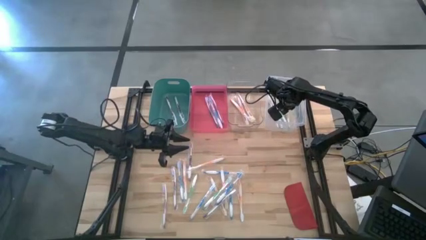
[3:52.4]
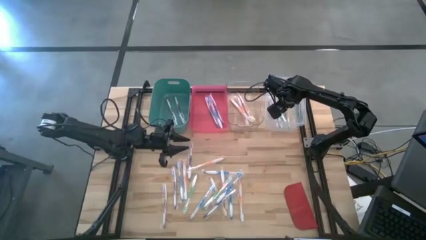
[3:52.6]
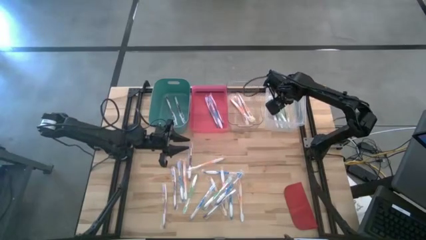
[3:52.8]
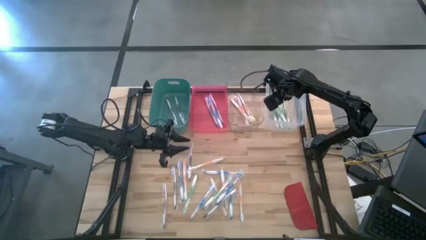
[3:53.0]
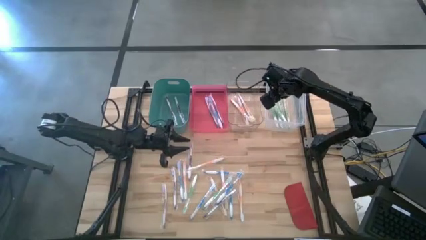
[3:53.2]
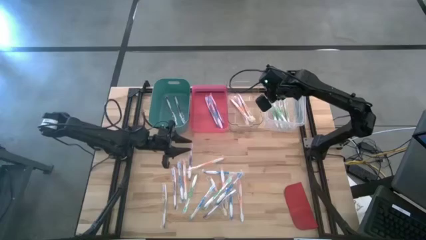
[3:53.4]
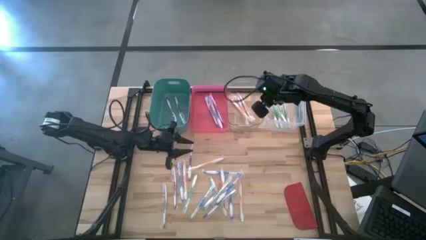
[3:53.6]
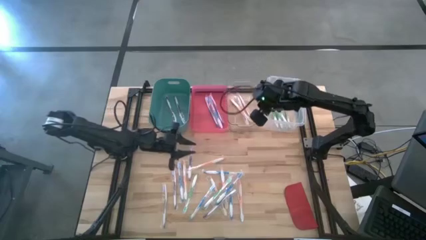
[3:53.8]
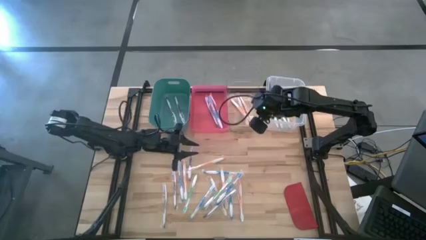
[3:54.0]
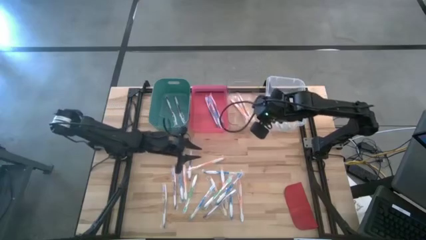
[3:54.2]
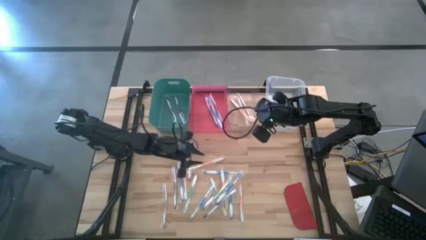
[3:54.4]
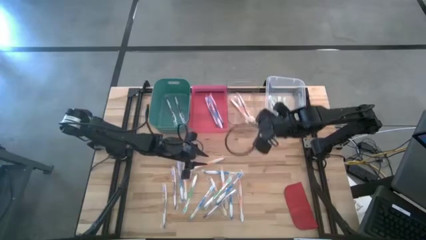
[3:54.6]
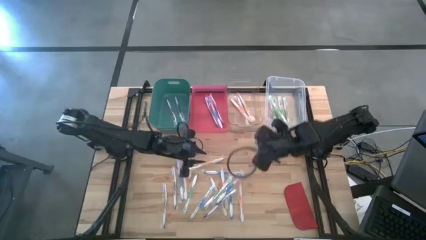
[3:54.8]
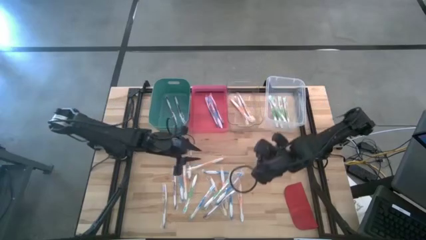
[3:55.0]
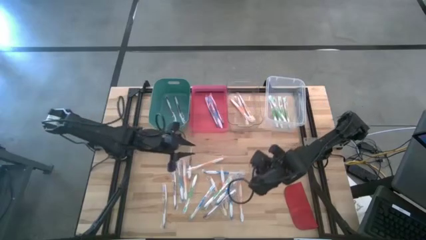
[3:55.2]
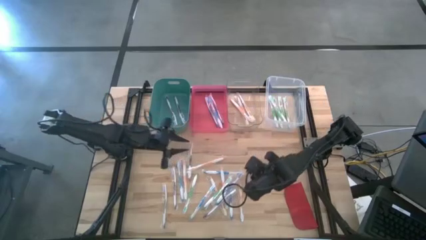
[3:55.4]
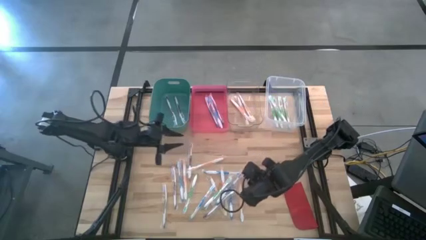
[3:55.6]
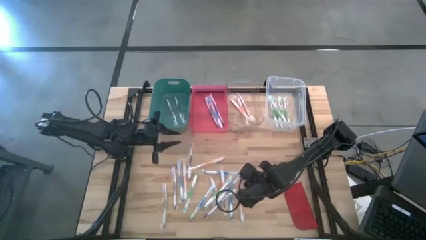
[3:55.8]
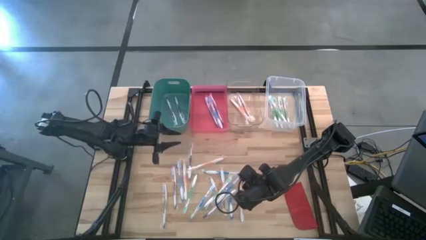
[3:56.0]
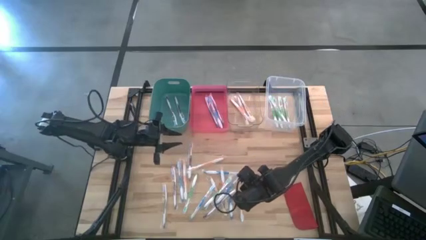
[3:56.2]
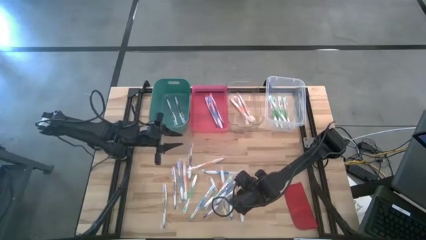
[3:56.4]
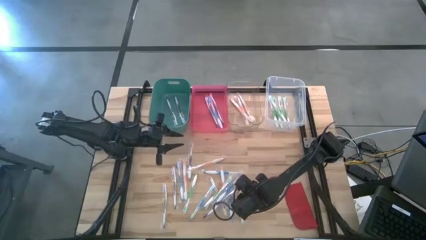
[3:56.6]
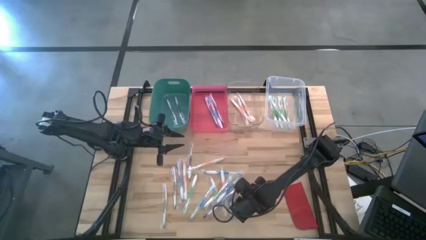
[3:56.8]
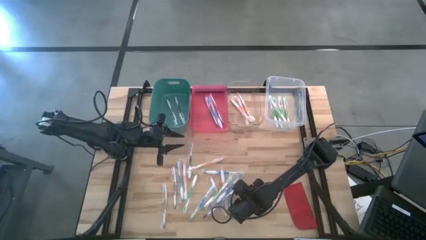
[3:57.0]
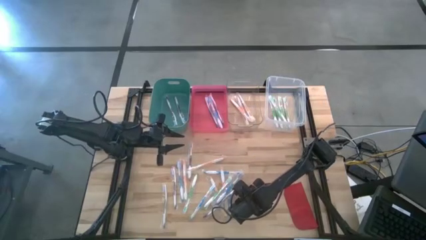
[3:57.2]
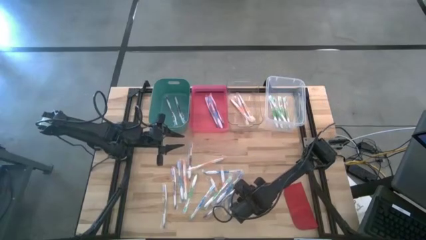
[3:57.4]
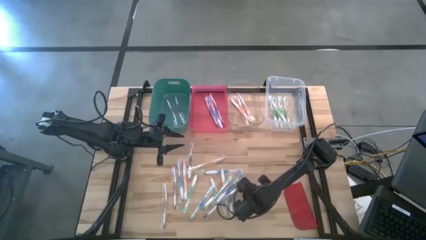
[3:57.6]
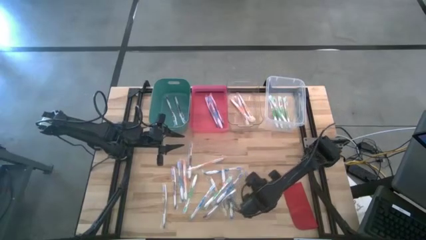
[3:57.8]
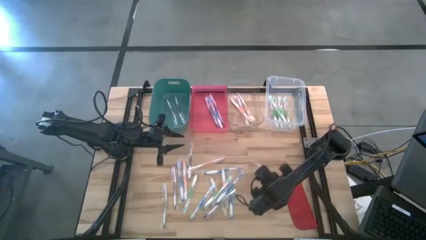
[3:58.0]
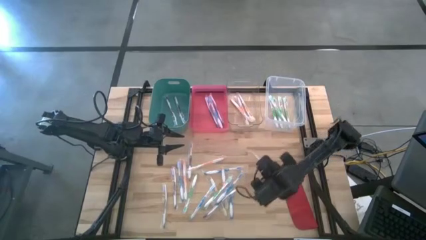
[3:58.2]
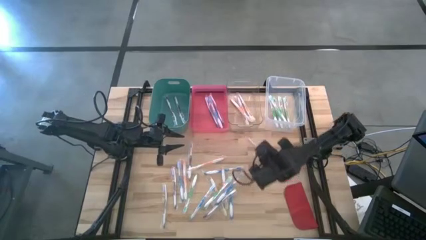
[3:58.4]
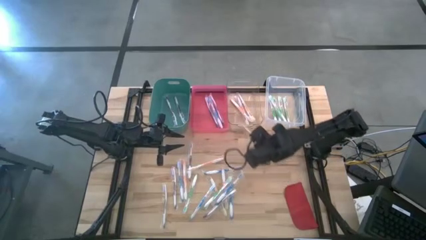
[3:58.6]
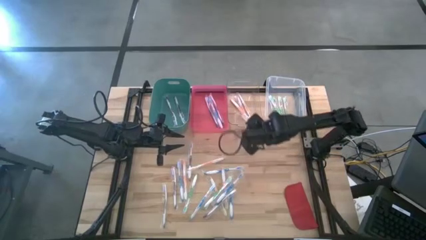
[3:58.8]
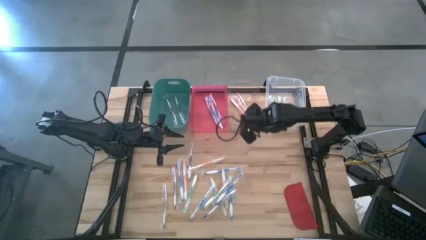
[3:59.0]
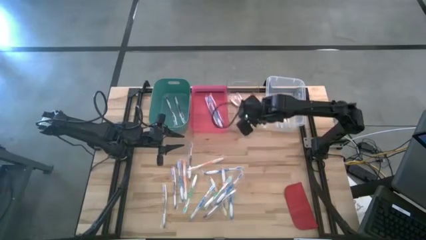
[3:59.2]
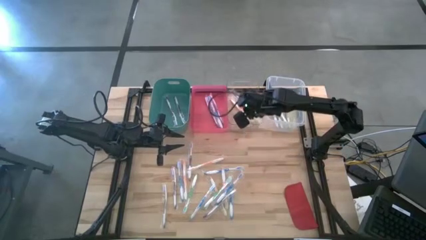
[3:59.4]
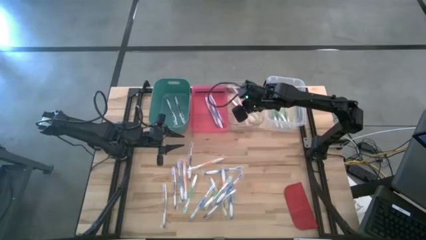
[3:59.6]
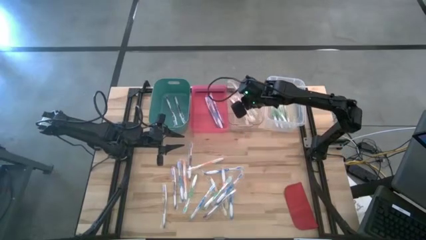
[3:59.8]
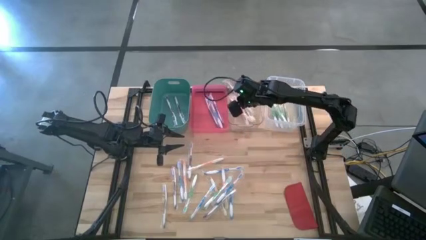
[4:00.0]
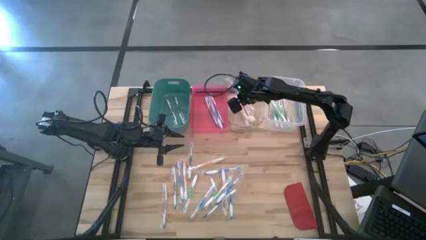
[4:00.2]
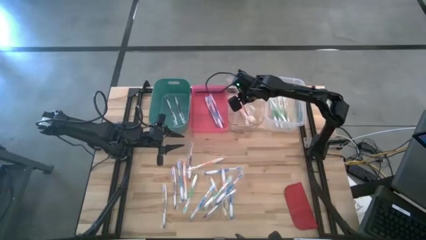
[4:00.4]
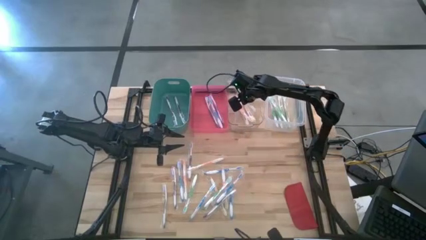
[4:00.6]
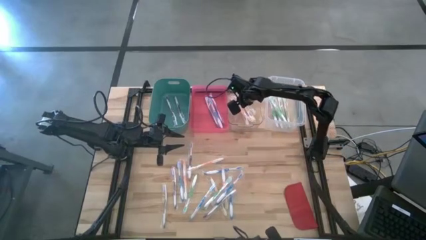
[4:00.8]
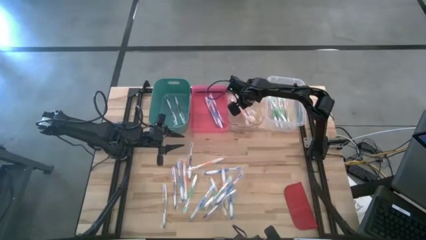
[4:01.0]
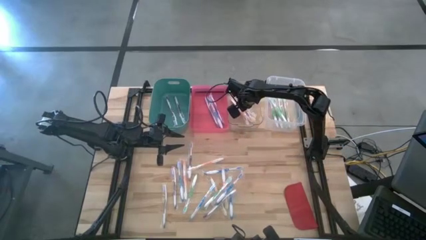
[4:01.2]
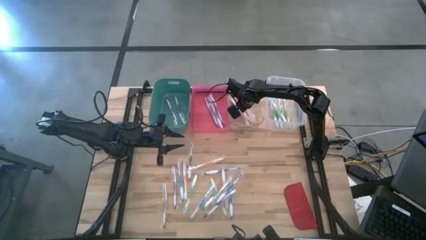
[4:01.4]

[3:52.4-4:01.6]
Task: Pick & Place Toothbrushes
Put the orange toothbrush into the transparent bin

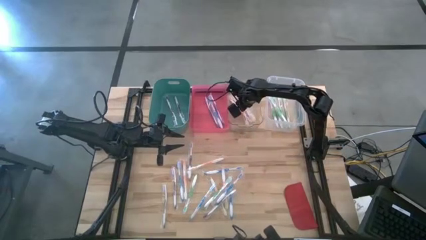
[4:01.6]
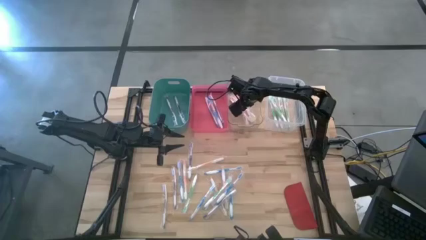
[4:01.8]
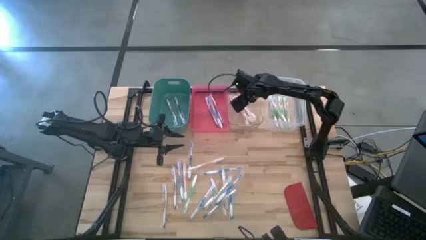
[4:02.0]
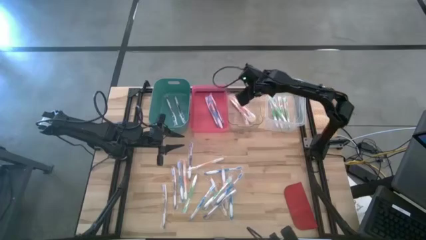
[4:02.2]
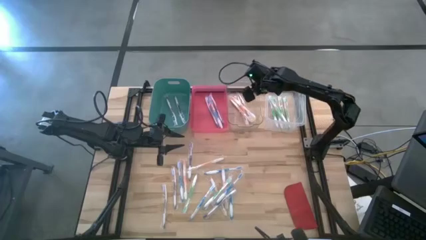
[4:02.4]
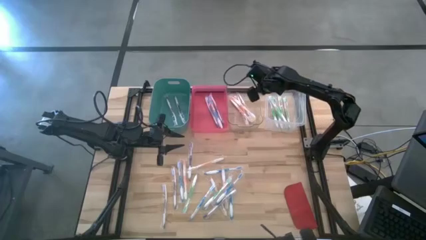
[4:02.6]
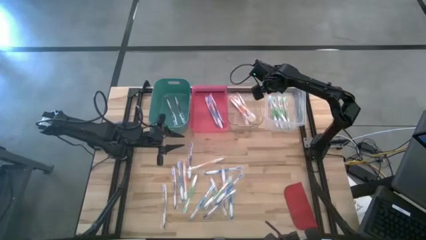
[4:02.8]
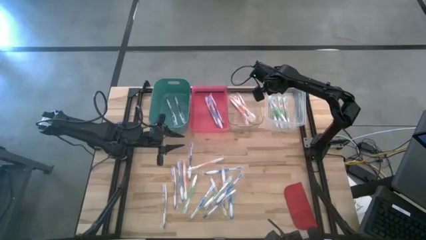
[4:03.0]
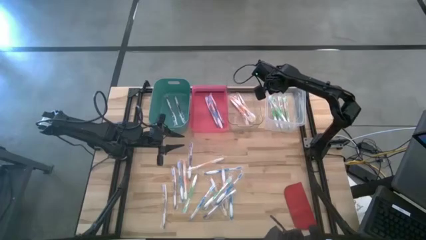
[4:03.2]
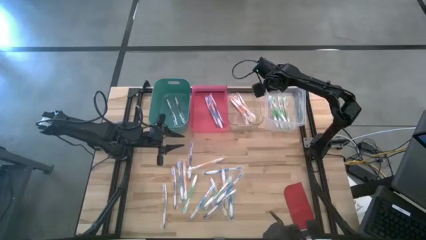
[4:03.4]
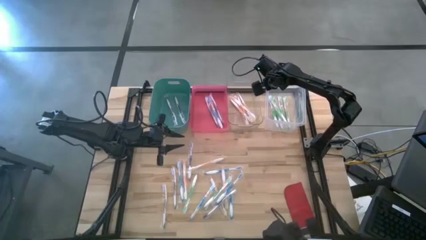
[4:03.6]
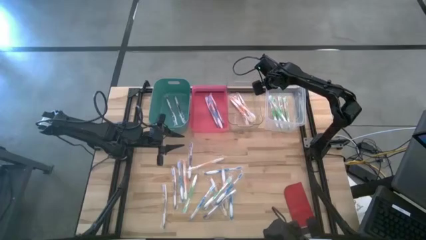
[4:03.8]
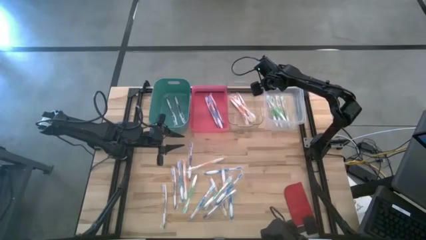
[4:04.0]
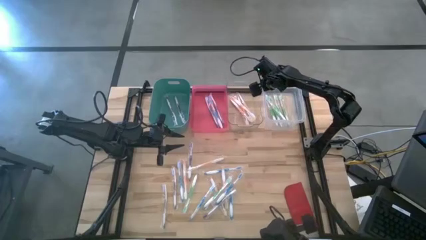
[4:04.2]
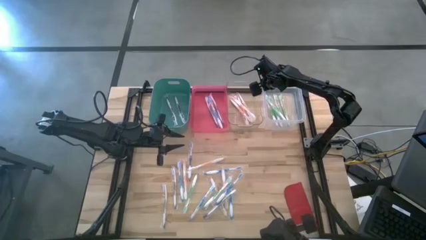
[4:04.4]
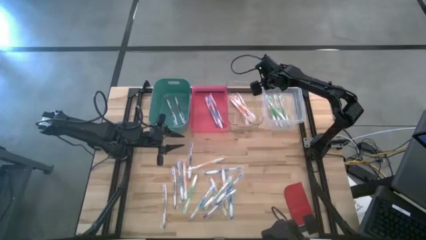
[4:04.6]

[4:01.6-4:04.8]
Adjust the white bin

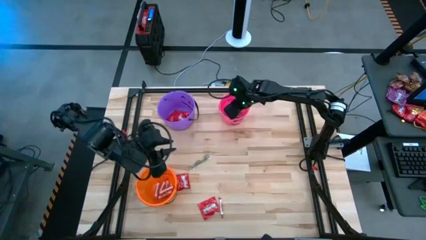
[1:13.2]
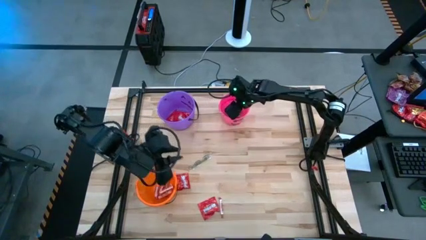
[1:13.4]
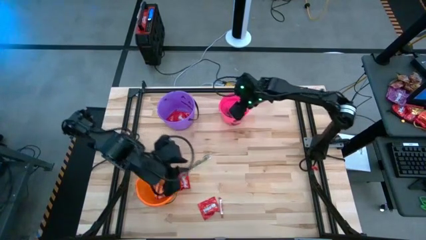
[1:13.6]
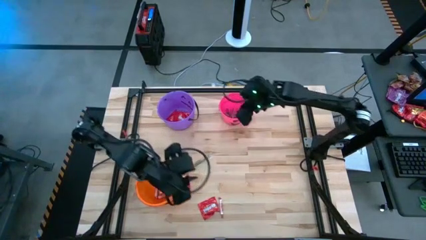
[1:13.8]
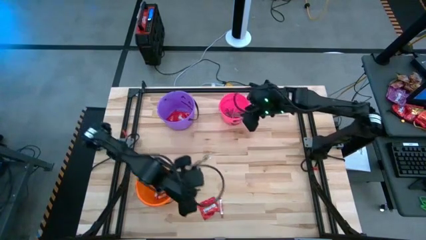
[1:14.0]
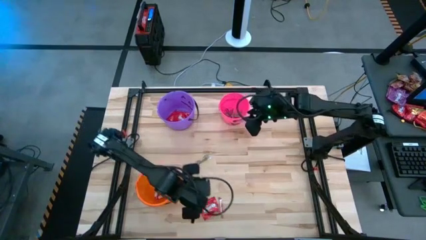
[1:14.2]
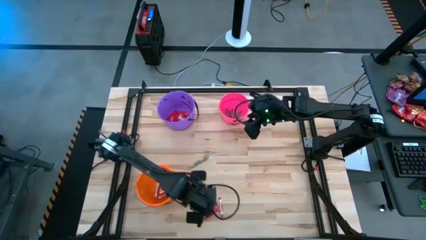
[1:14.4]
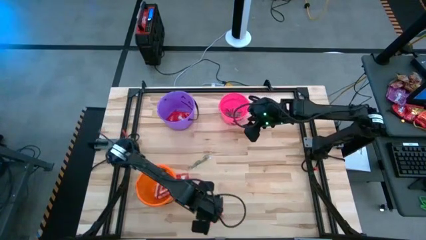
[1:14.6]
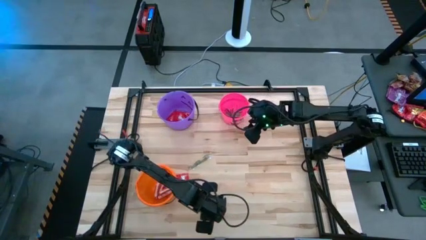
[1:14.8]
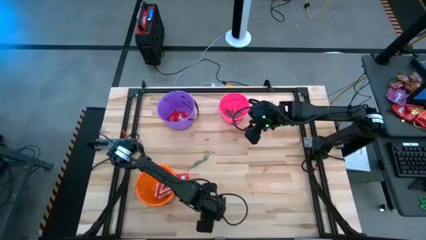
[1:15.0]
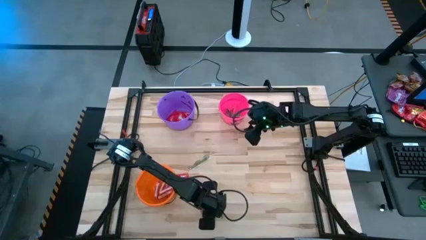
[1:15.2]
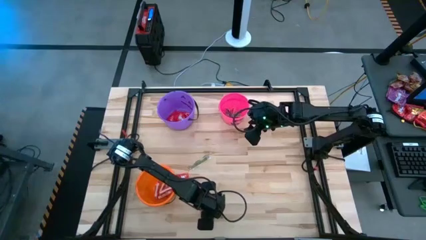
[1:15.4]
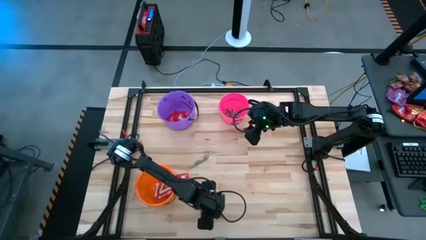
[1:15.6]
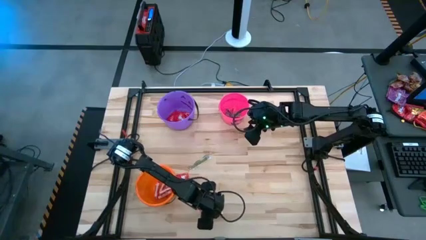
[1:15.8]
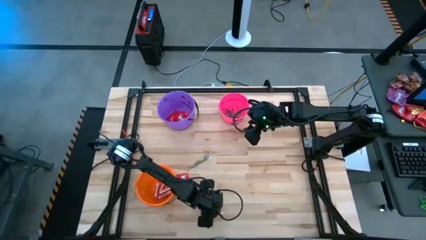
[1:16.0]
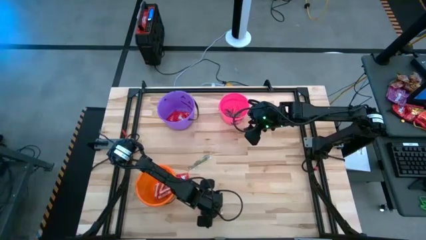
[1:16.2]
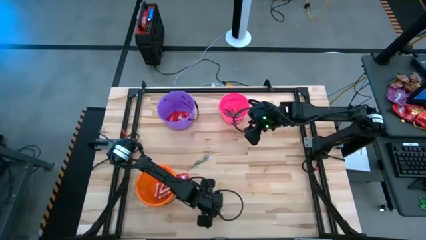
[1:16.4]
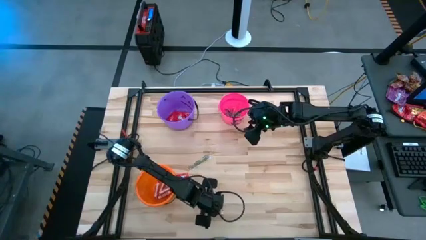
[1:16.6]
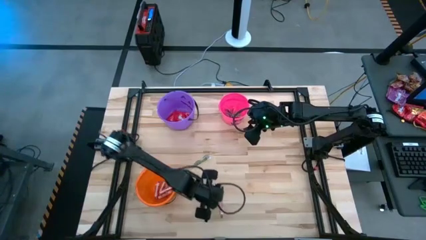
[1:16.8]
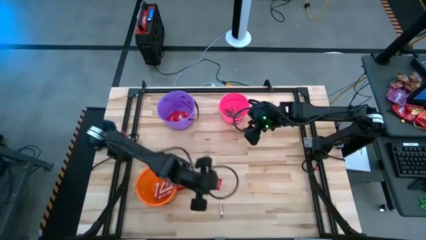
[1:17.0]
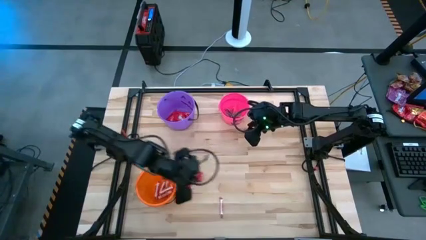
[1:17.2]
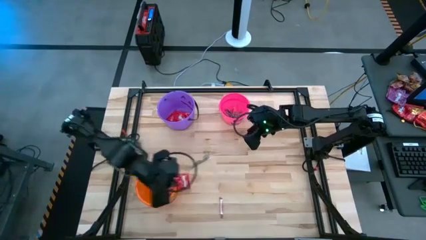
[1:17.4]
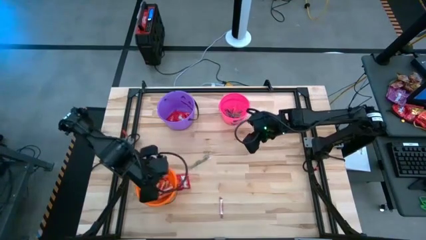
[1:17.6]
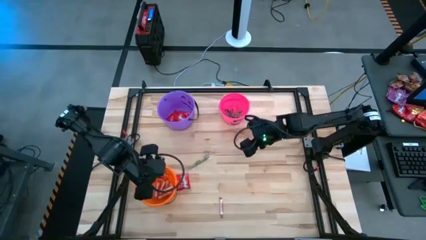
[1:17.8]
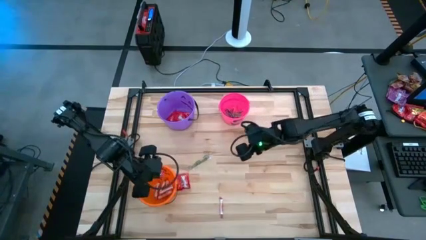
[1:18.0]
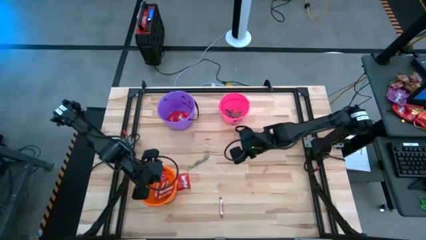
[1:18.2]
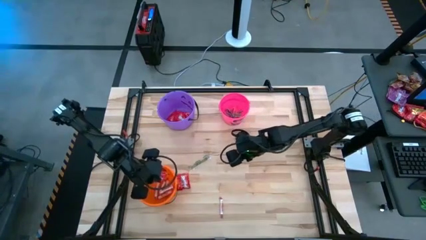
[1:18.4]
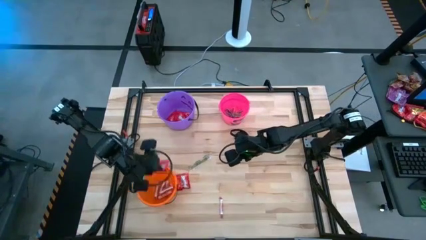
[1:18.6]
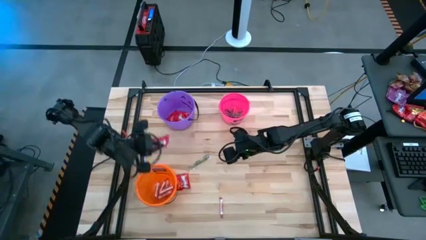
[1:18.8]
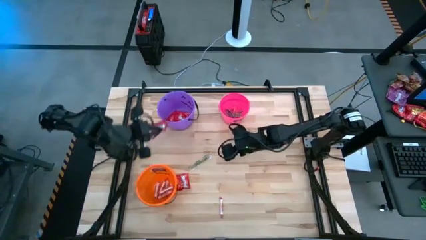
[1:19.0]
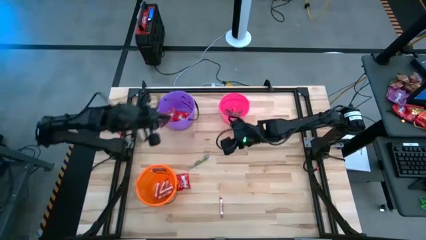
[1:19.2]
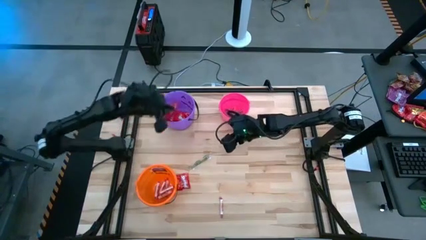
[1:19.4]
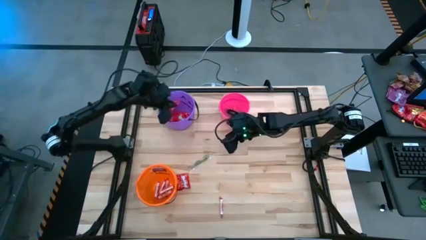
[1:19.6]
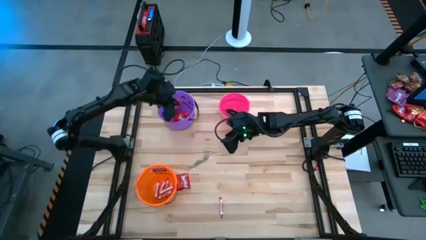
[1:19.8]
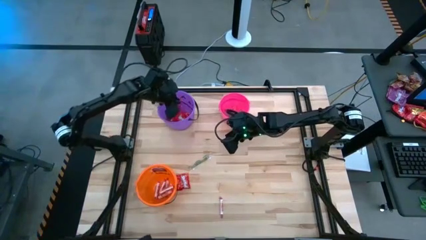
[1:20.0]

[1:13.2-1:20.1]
Task: Sort candy by brand, put in halloween buckets
Put the red candy into the purple bucket
